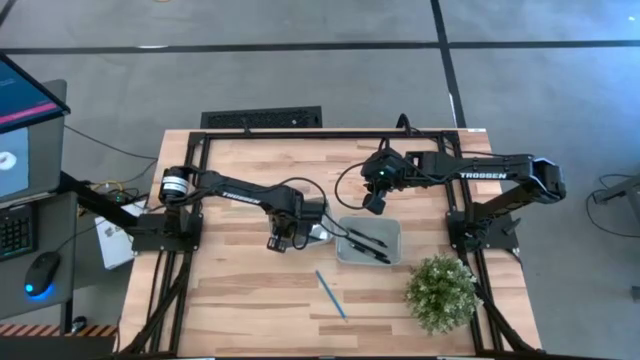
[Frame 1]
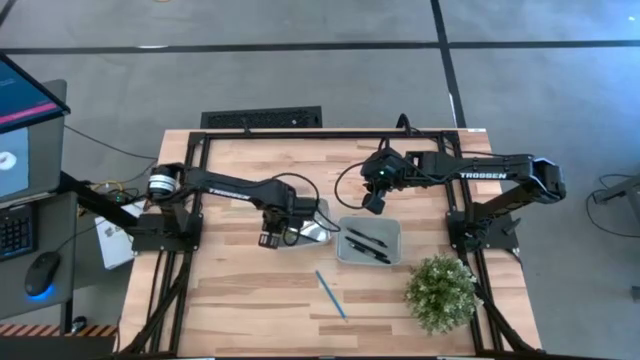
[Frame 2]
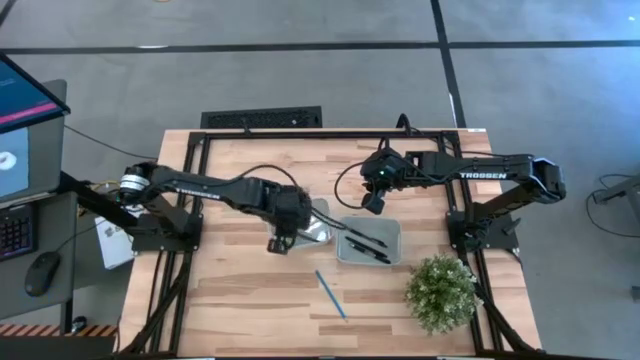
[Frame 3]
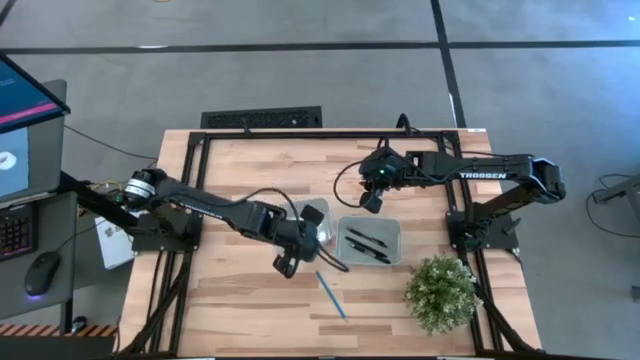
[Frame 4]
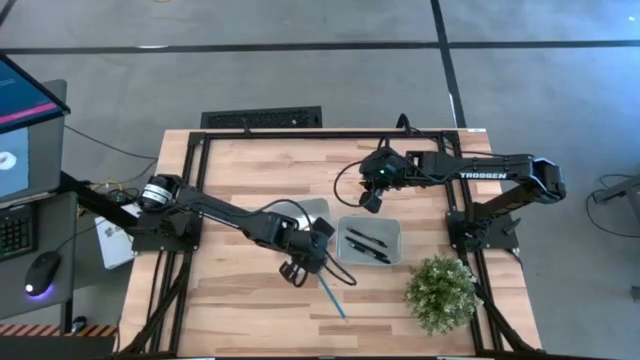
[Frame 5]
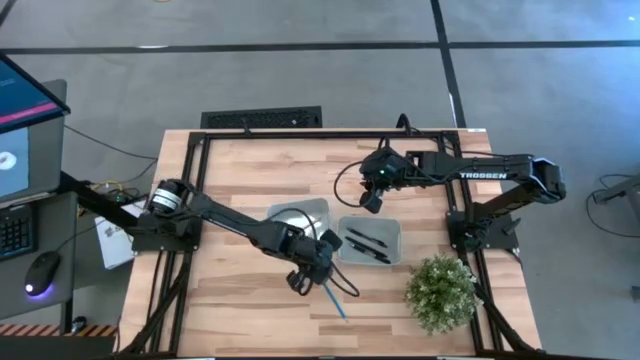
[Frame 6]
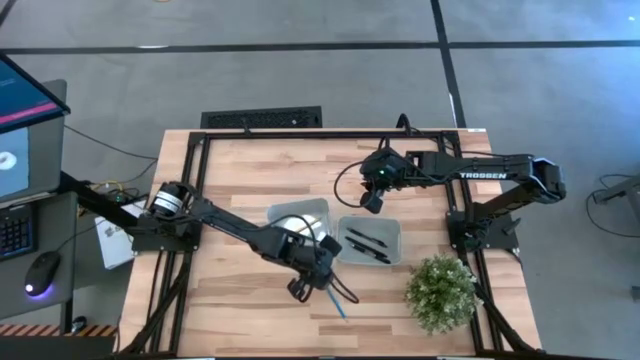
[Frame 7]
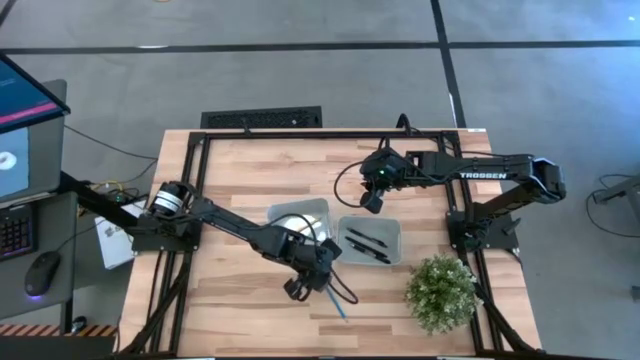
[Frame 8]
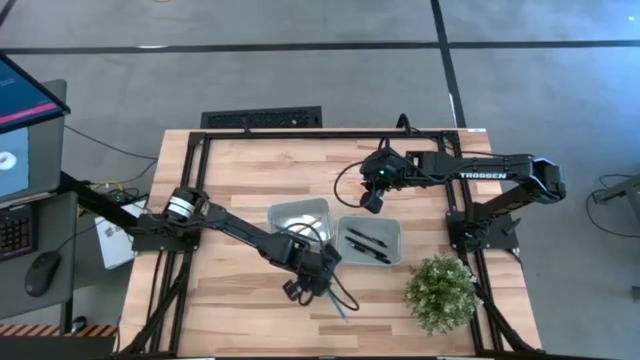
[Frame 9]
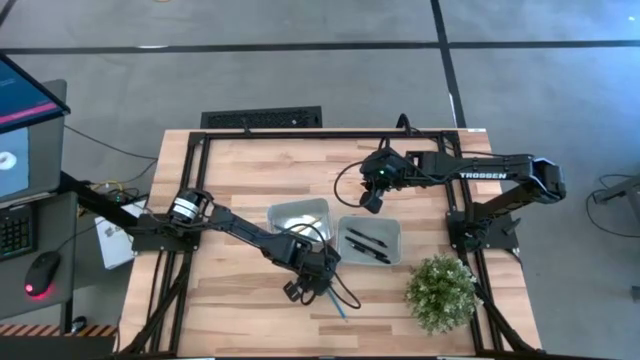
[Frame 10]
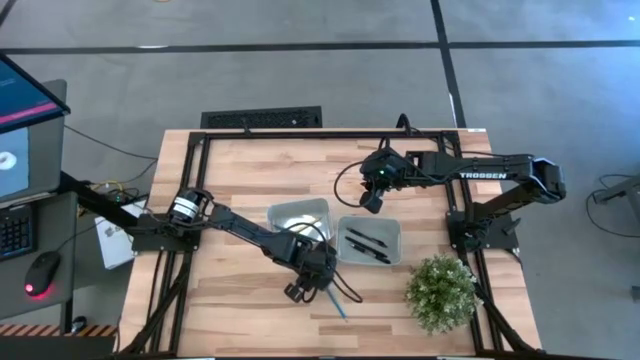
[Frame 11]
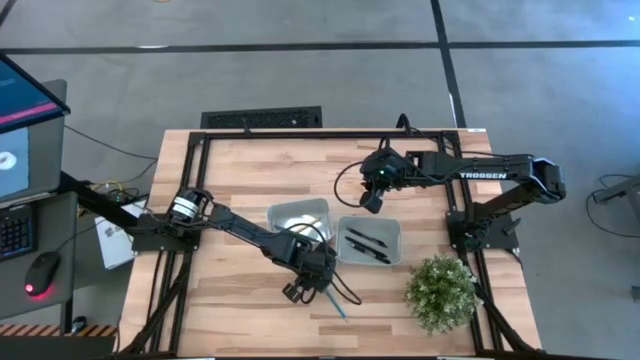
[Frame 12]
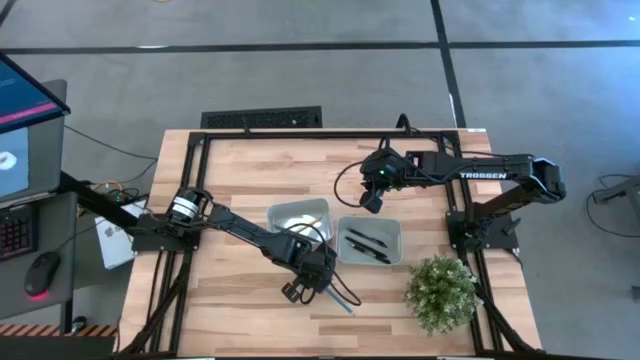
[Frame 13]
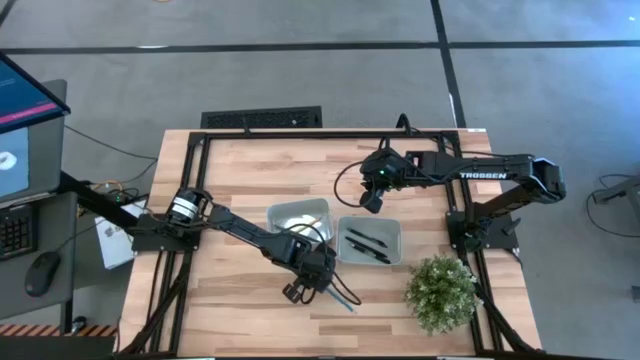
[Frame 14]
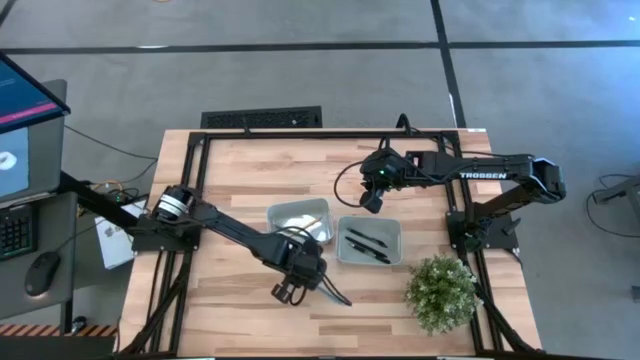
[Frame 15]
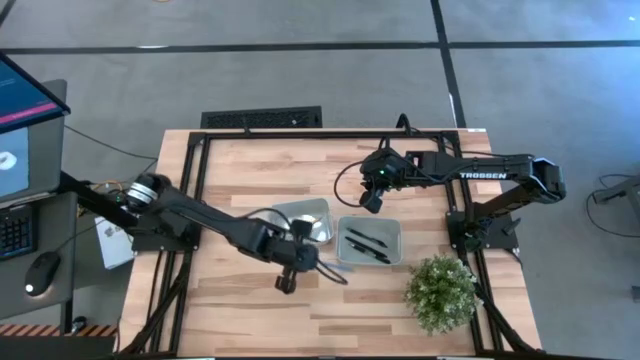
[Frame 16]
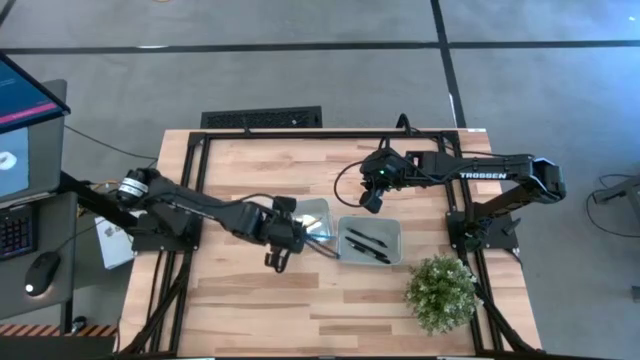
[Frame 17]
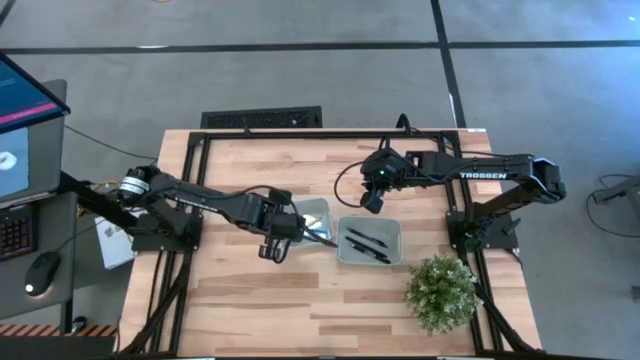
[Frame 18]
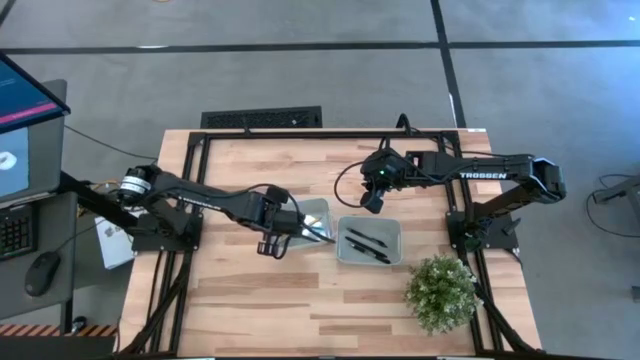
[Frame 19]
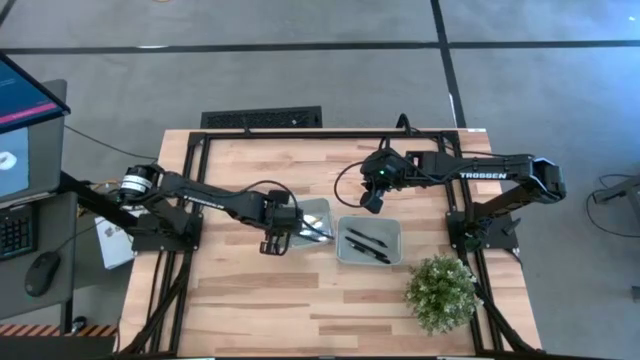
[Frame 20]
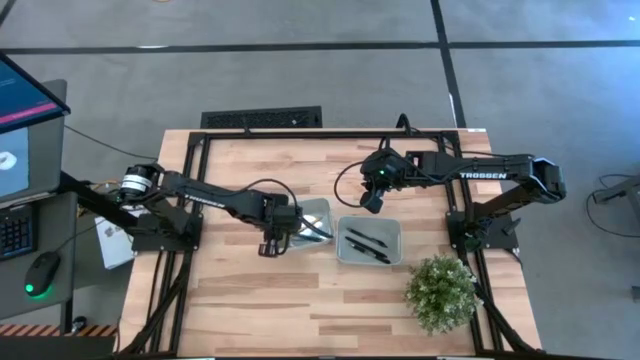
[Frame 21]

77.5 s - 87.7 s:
Task: Sort pens & pencils
Put the blue pencil into the left gray bin

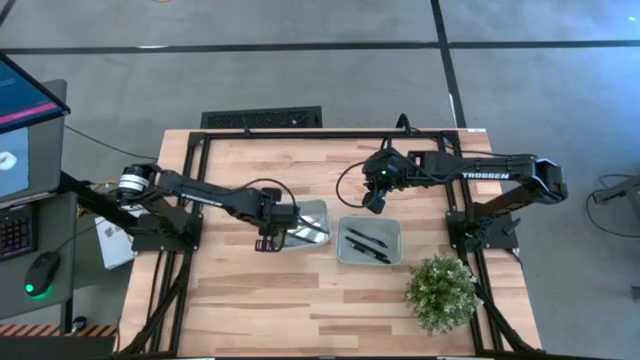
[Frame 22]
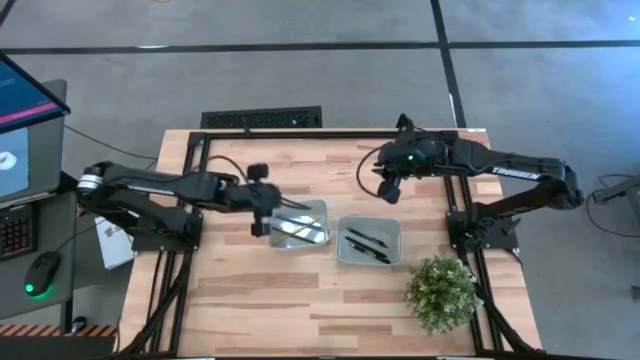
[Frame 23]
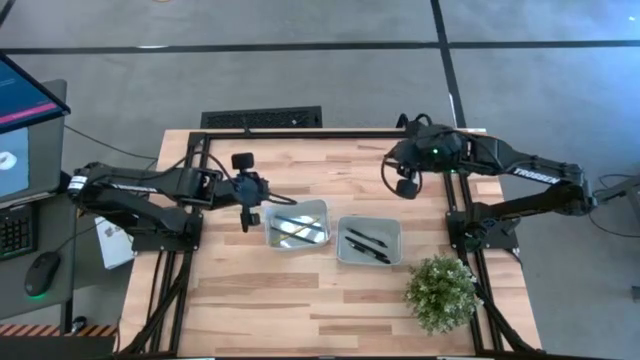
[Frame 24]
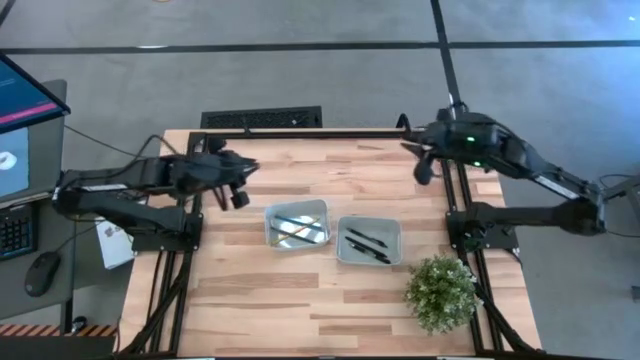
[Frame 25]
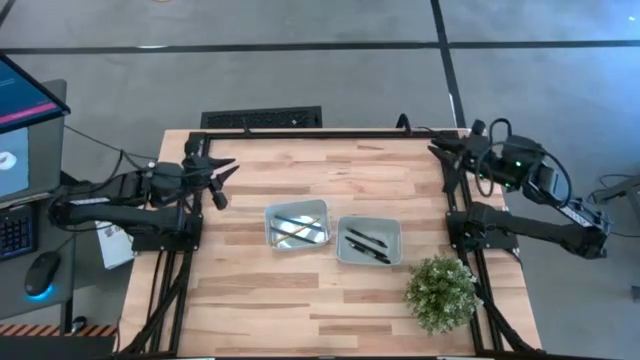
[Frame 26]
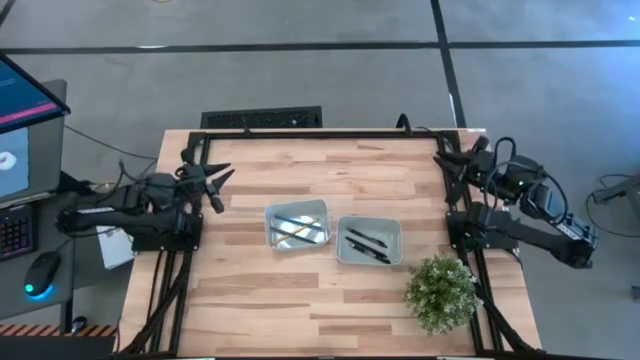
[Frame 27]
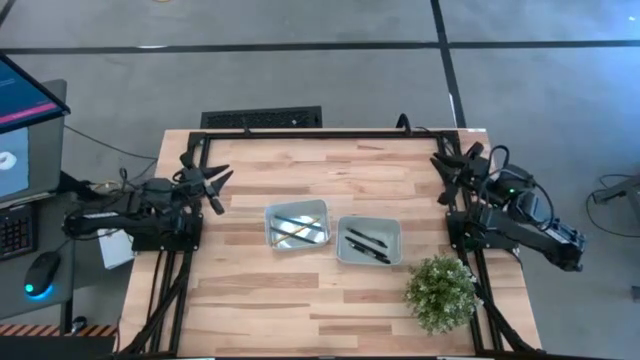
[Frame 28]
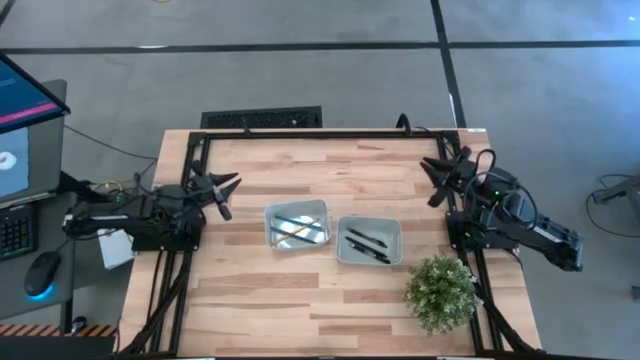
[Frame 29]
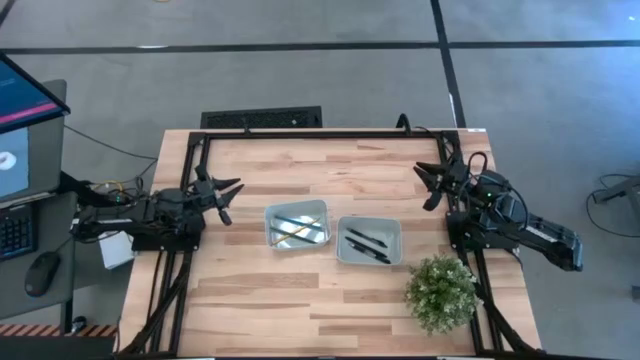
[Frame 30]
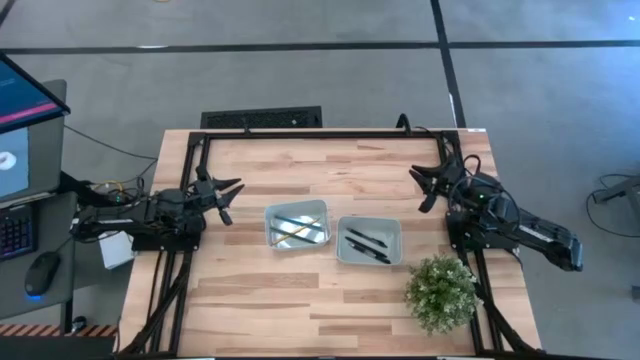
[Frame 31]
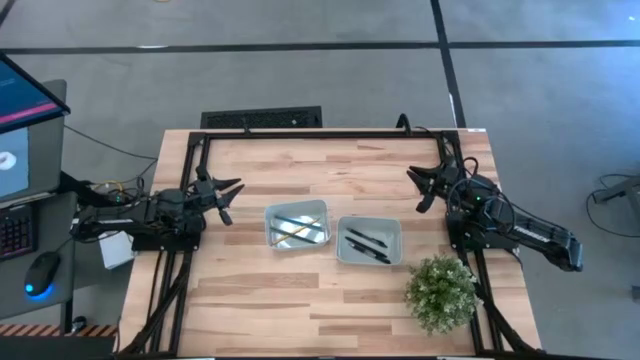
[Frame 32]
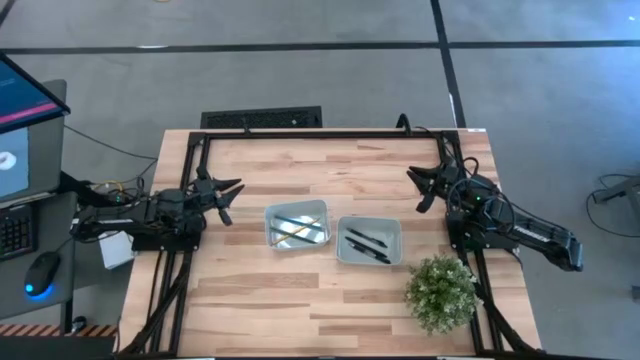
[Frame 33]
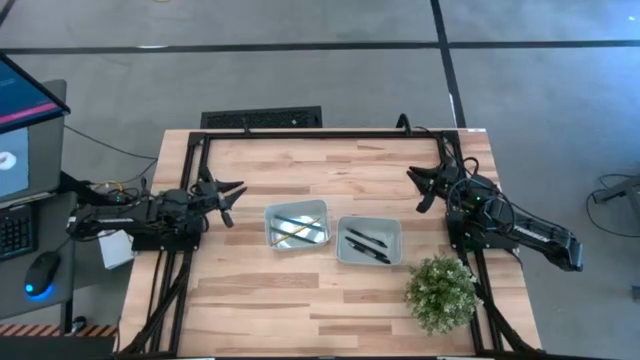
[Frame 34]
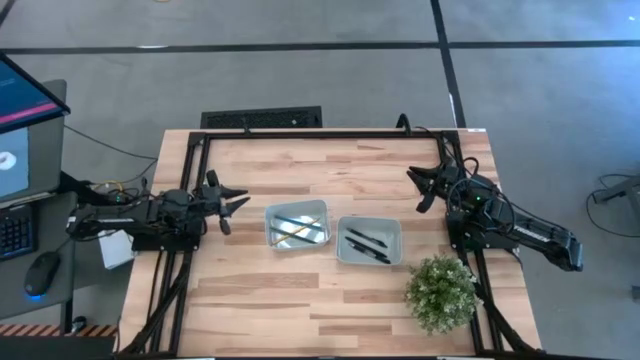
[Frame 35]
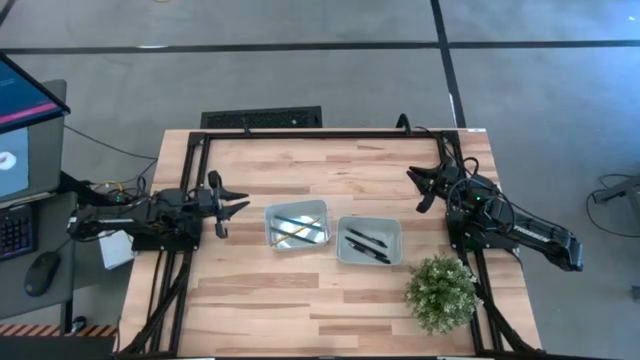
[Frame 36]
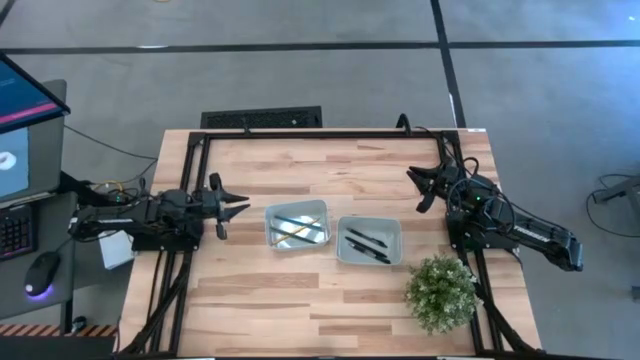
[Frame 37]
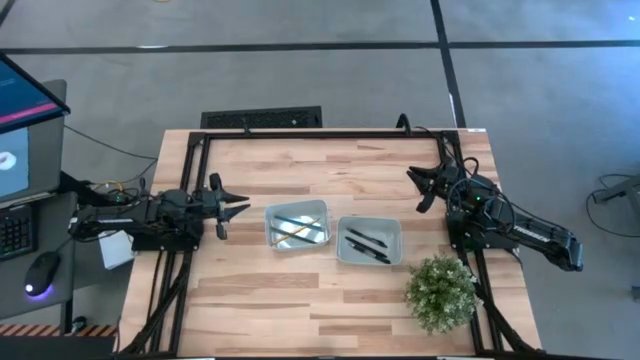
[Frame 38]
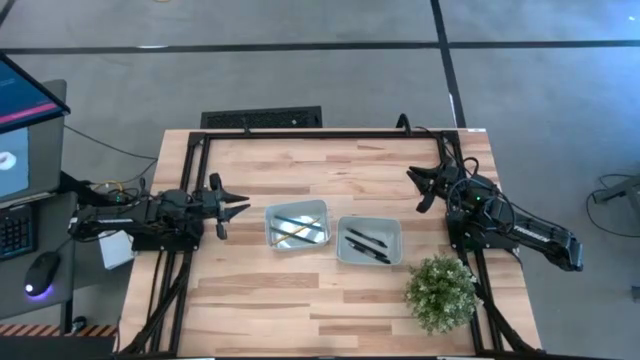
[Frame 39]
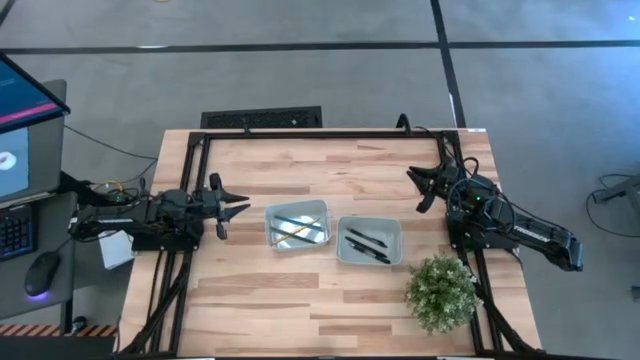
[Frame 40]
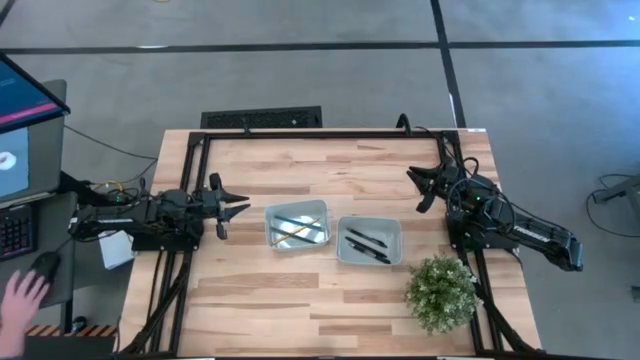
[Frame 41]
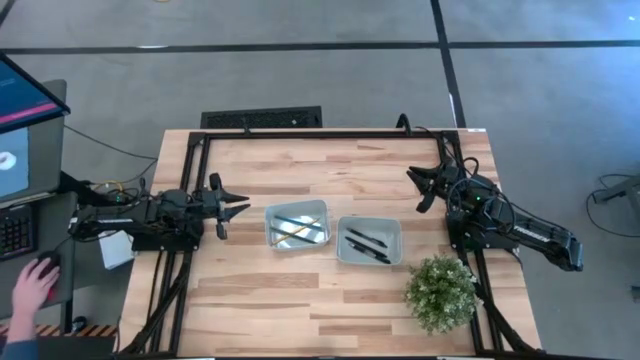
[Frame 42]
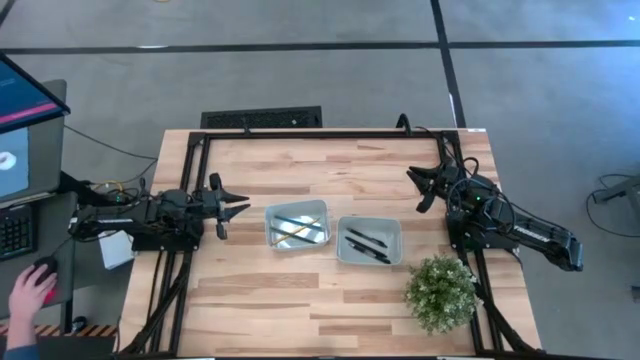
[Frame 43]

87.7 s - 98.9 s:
Return to Home Position
